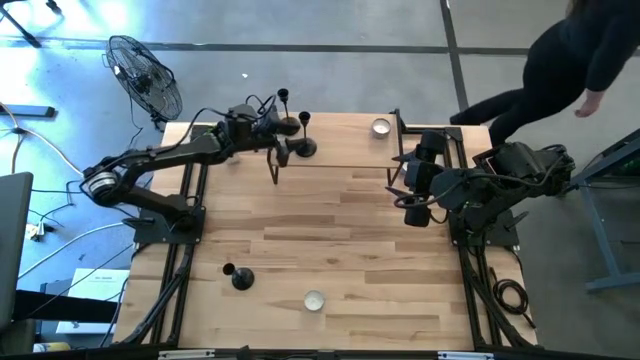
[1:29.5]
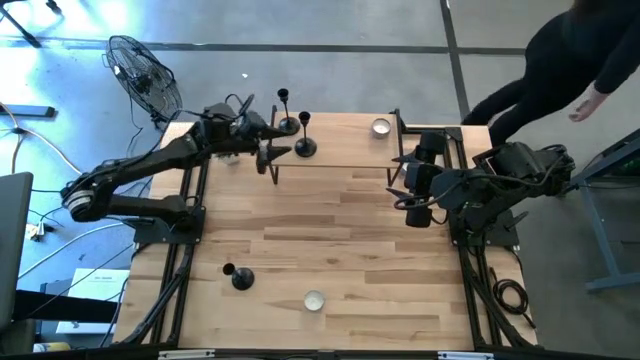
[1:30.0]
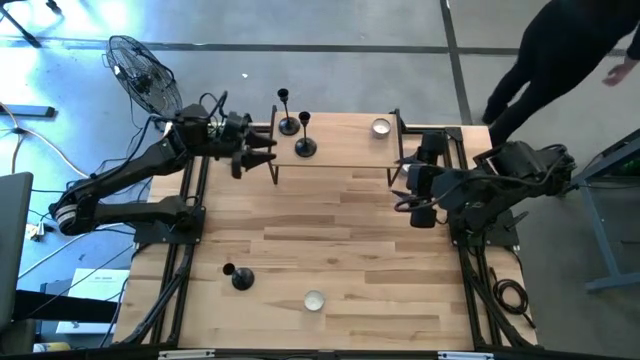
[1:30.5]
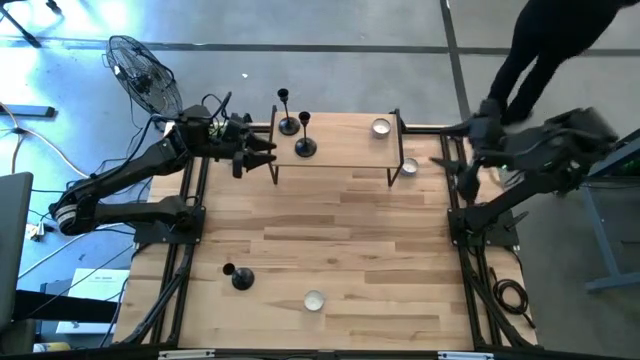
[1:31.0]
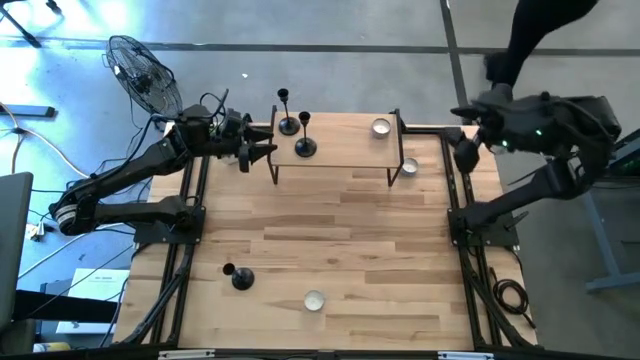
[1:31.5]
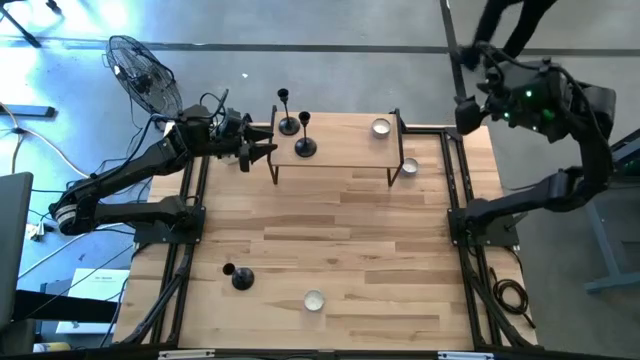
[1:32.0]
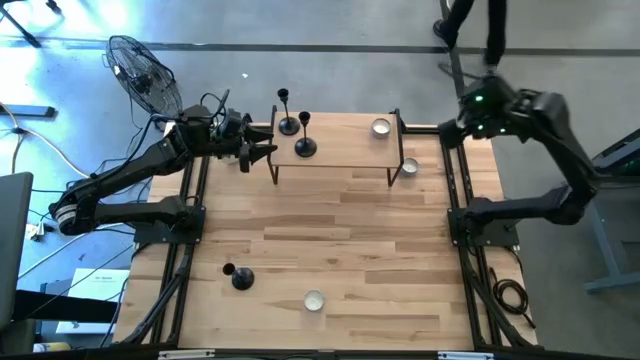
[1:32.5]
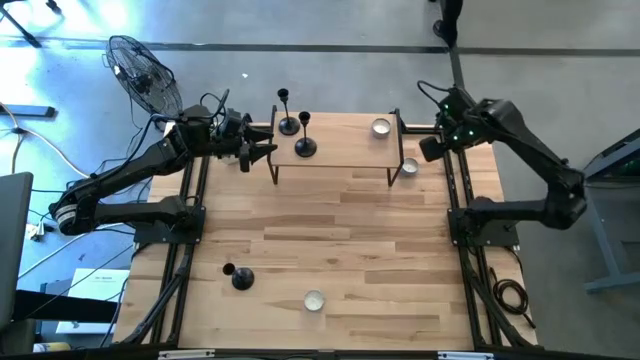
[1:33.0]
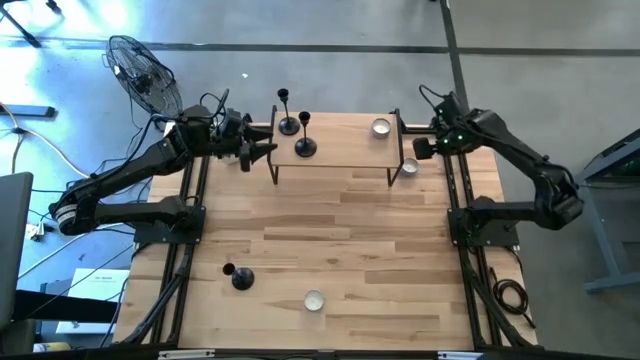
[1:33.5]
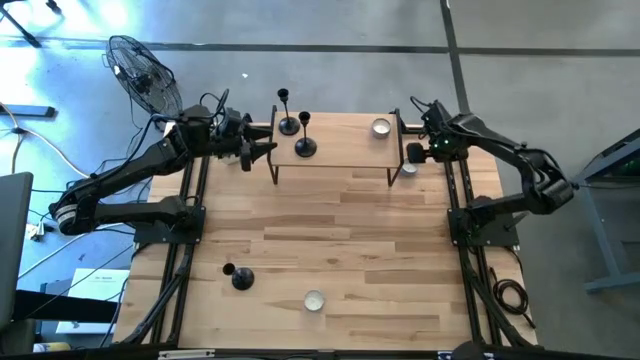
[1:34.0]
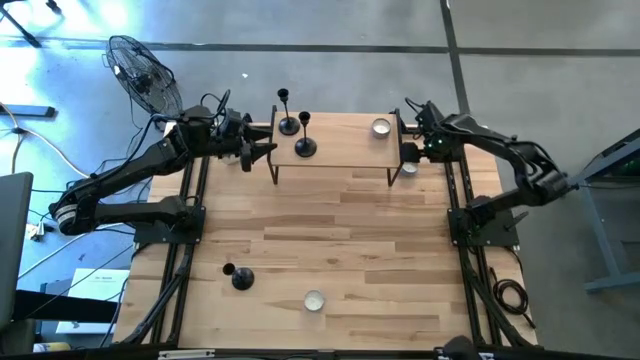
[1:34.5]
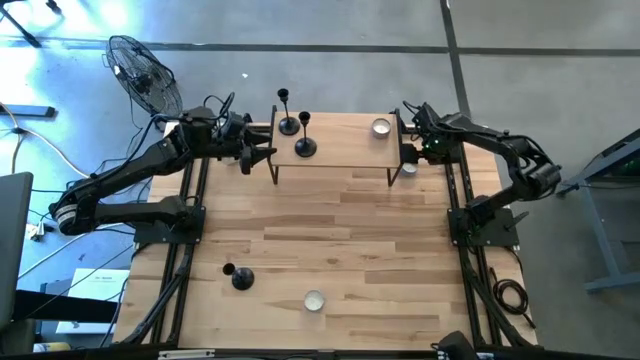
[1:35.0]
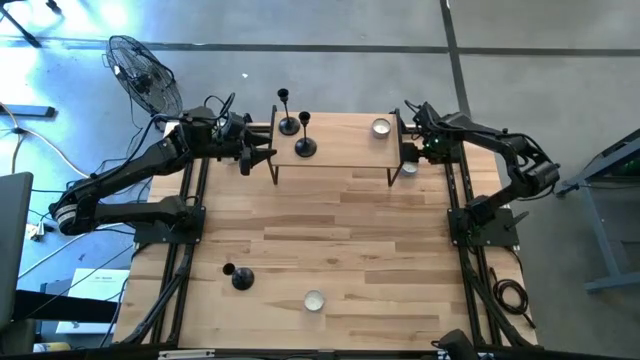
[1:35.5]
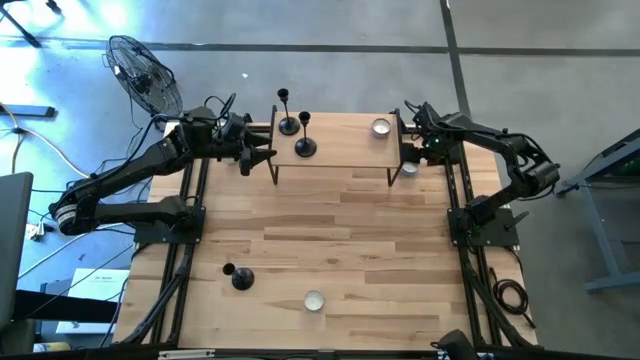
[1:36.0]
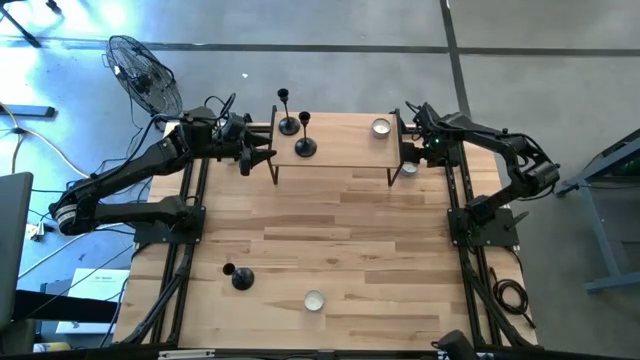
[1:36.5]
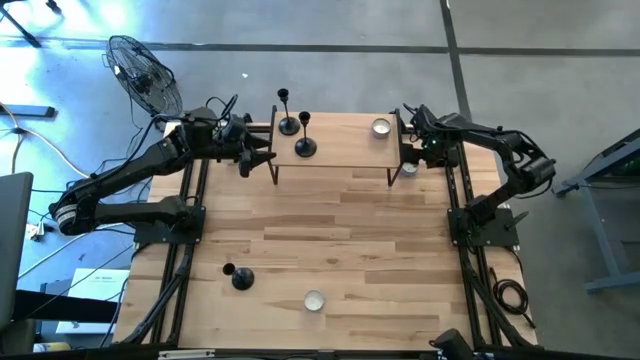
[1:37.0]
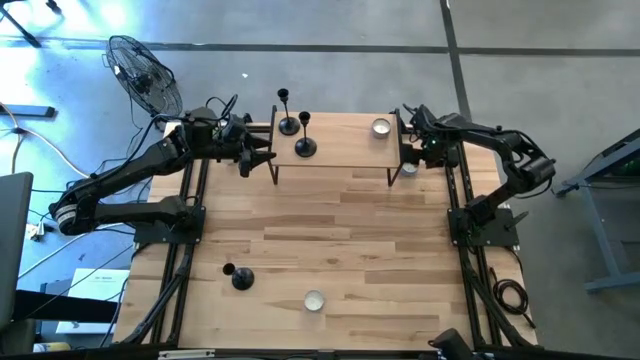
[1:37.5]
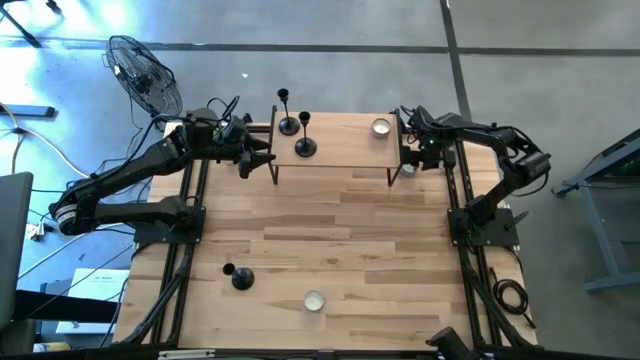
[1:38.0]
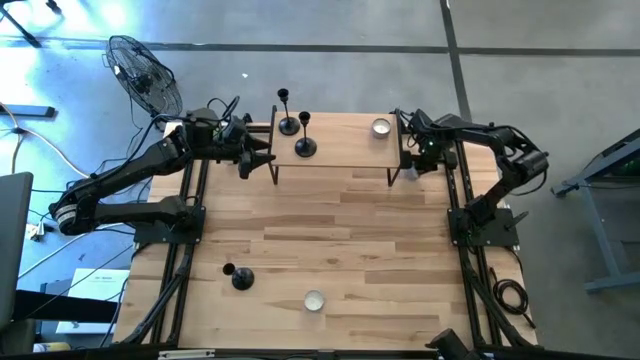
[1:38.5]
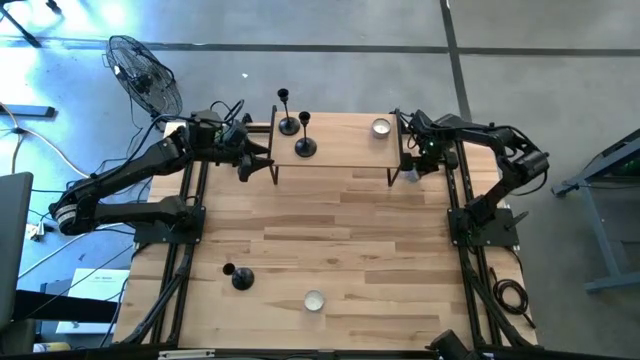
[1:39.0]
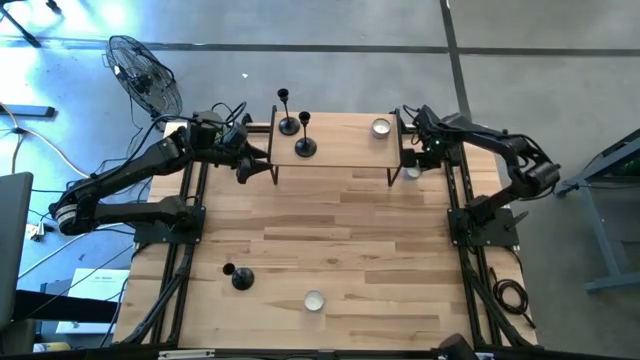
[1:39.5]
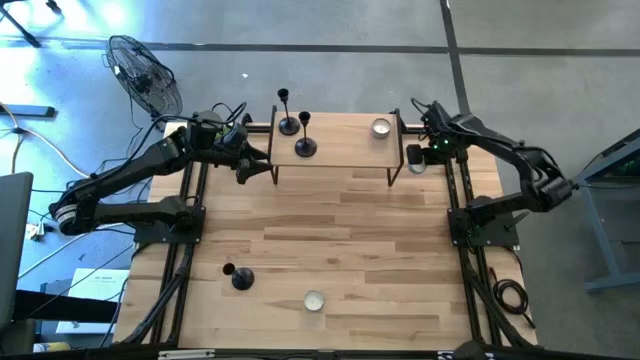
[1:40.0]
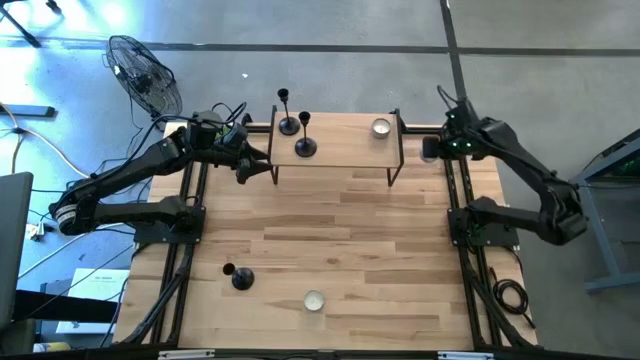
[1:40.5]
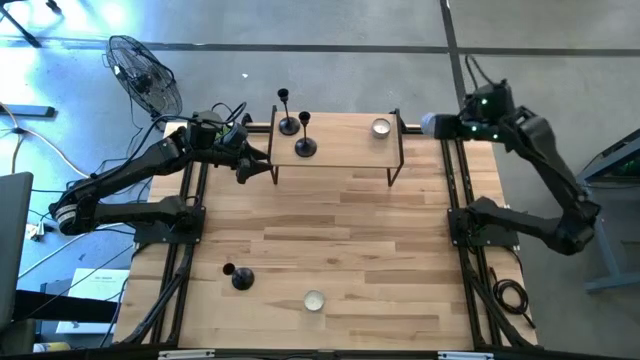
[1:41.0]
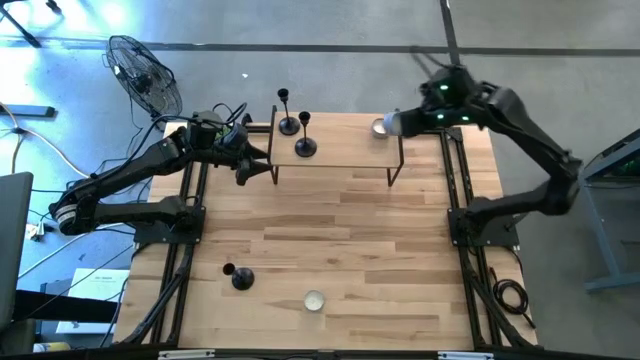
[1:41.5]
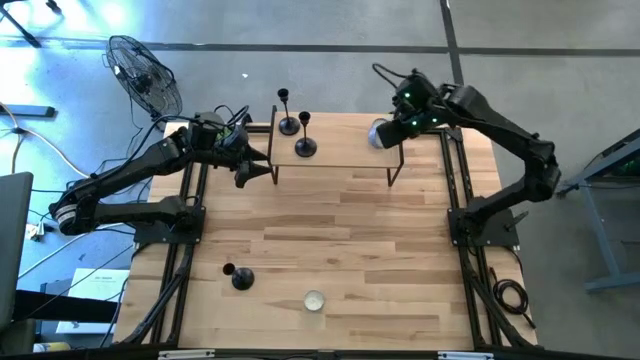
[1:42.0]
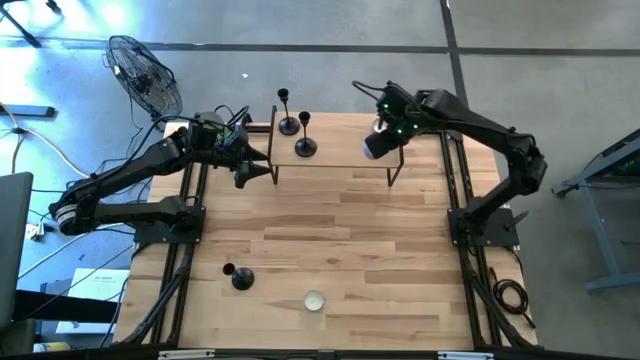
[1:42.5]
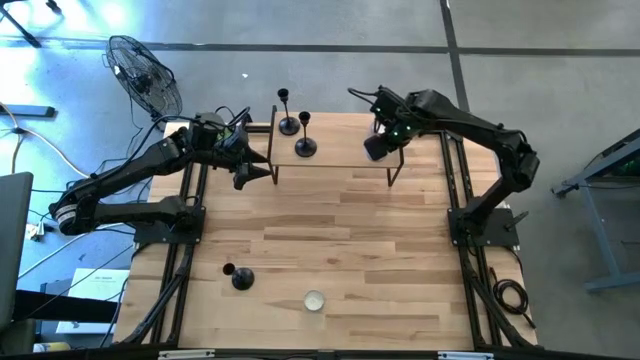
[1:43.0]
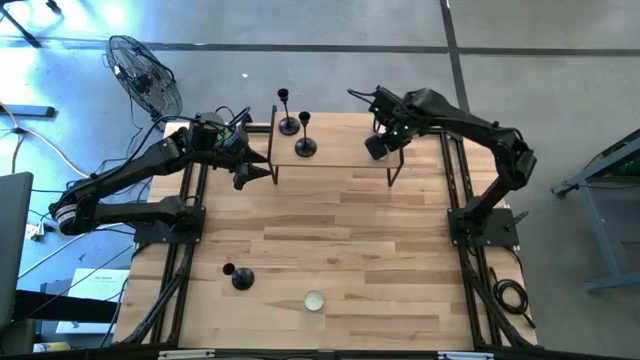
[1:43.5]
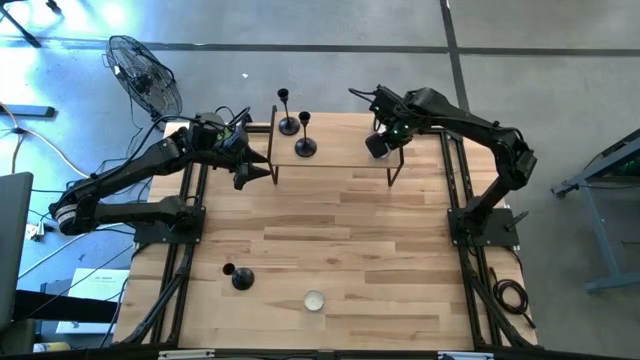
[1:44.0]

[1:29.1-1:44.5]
Task: Pick & Place candle stick holders
Put the blue patterned scented candle on the shelf

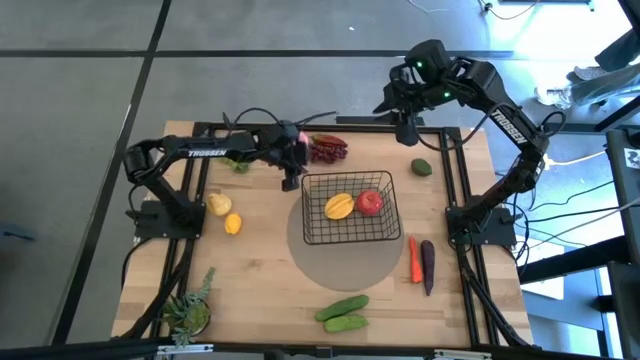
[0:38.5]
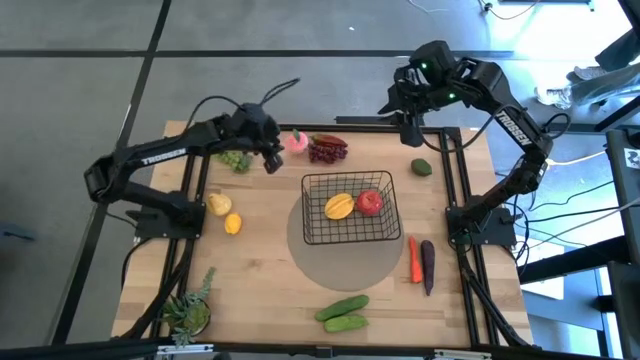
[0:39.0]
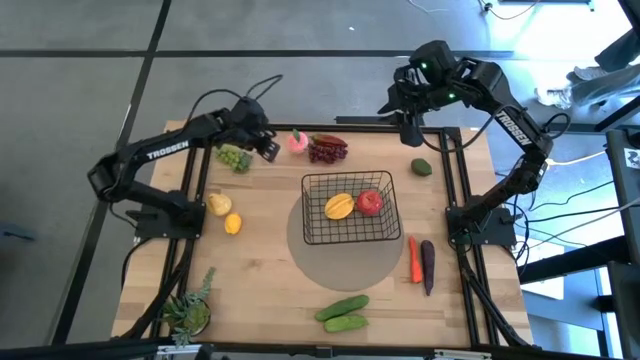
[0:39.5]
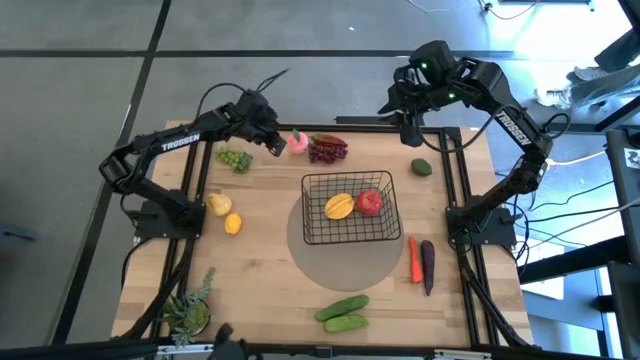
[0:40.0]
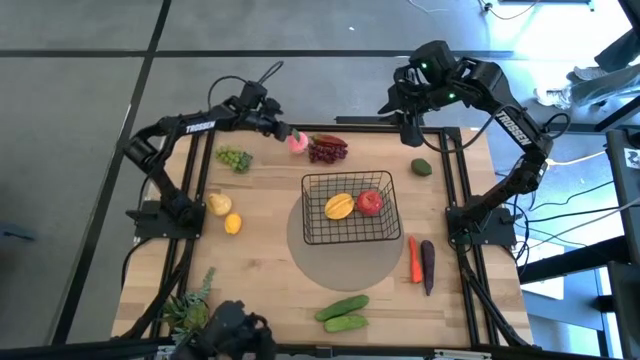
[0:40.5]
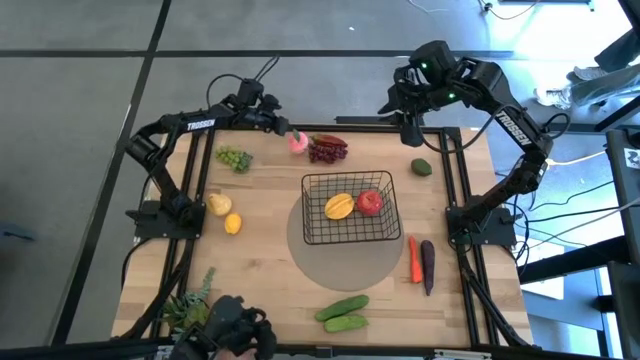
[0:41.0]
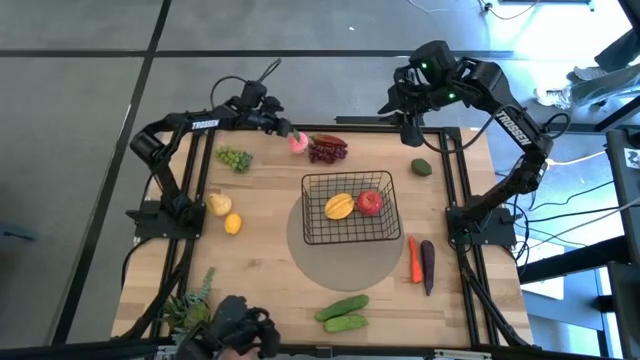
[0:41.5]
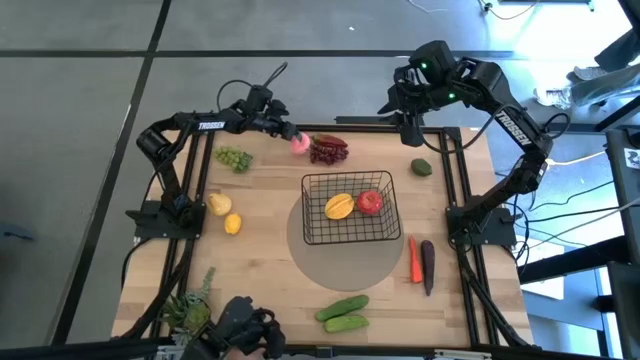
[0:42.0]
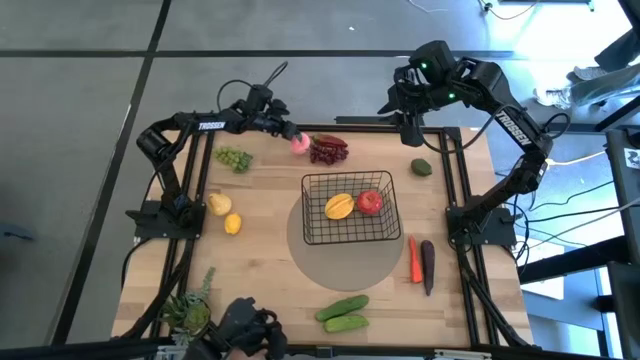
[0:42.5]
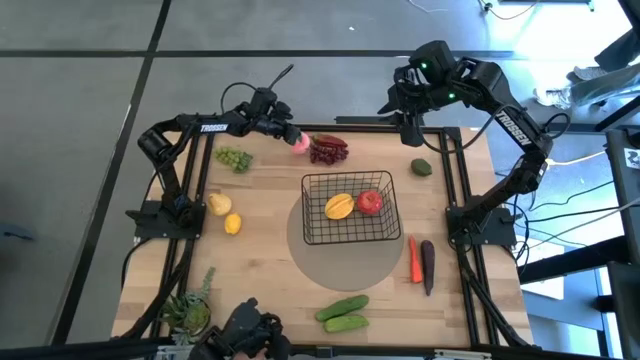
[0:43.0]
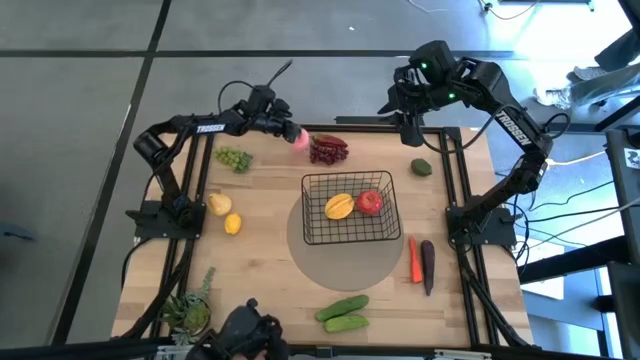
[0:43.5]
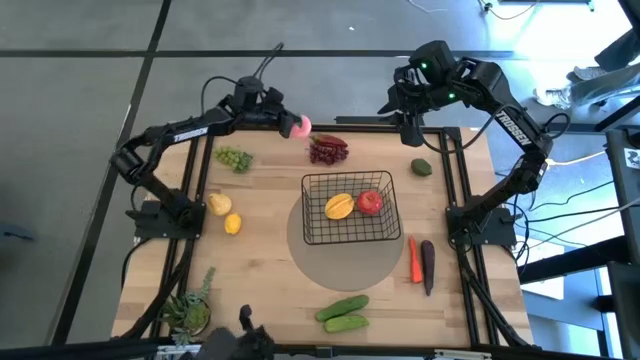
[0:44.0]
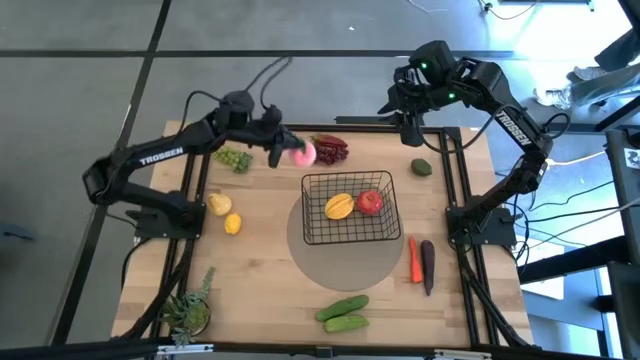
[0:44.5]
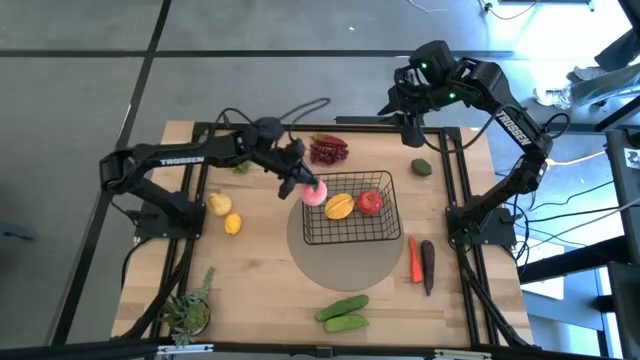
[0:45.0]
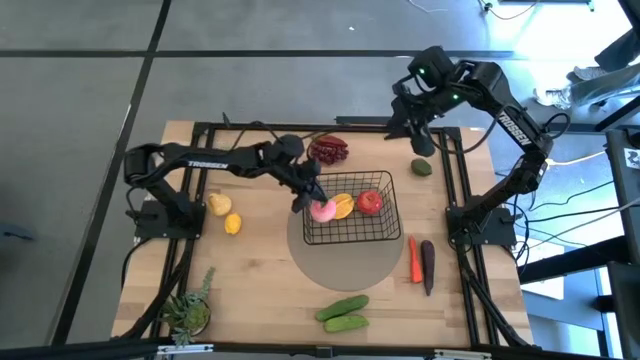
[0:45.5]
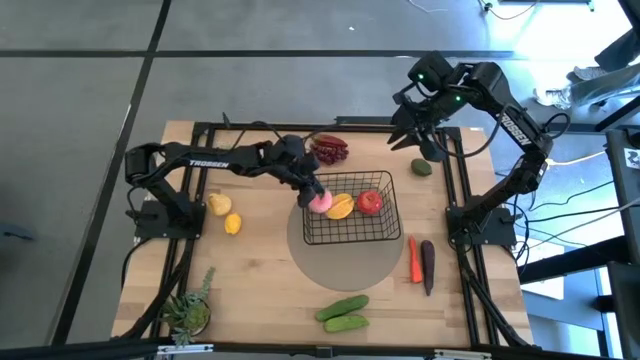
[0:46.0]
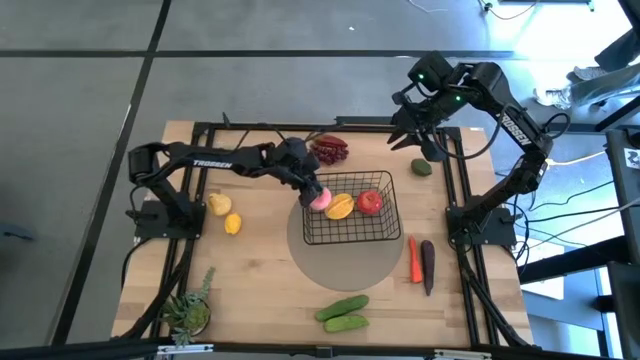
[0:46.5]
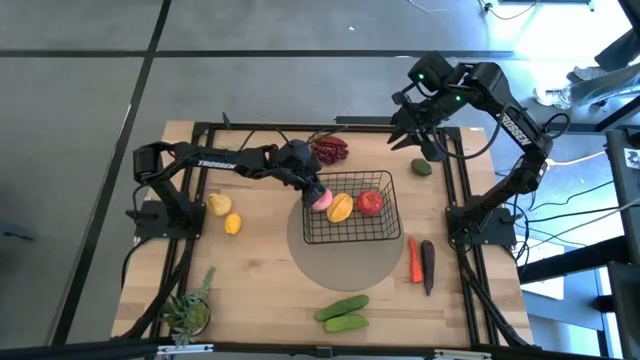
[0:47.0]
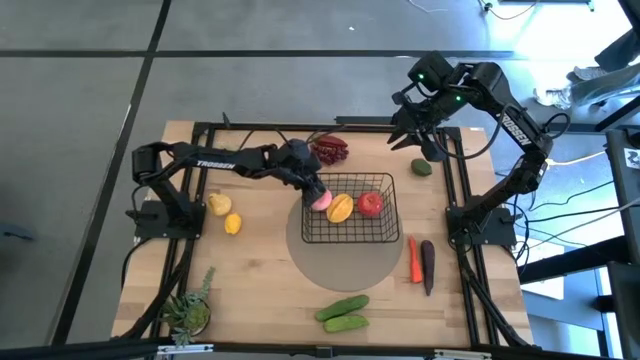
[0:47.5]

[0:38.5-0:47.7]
Task: Build produce basket
Put the pink peach into the black wire basket
